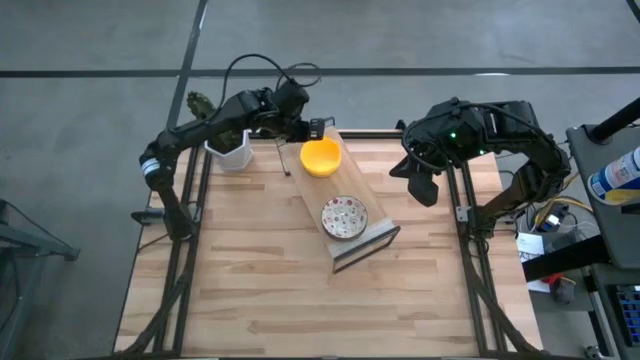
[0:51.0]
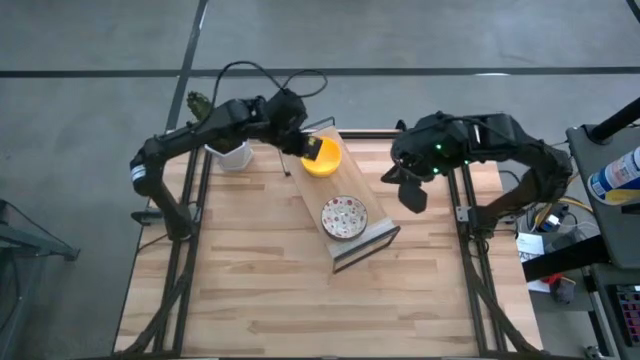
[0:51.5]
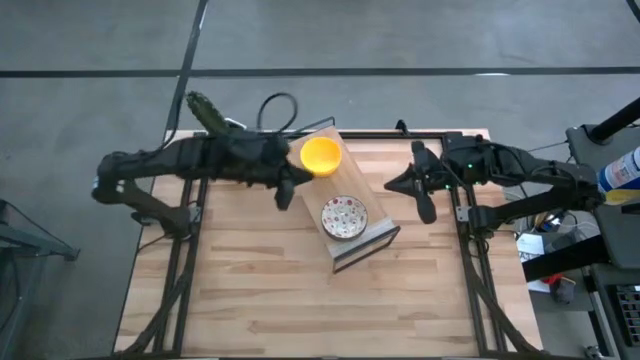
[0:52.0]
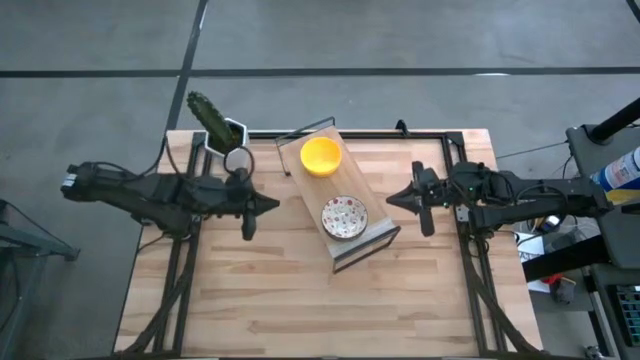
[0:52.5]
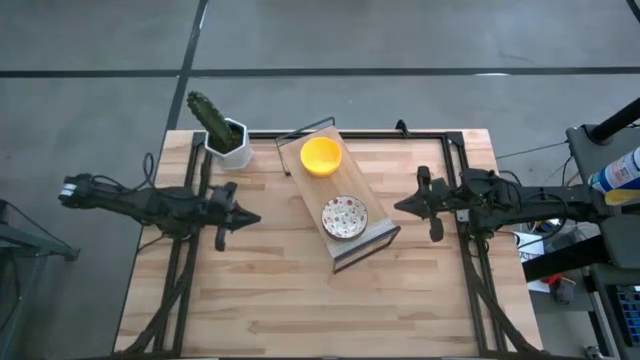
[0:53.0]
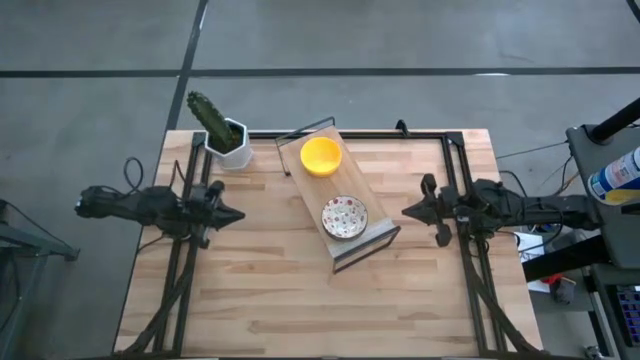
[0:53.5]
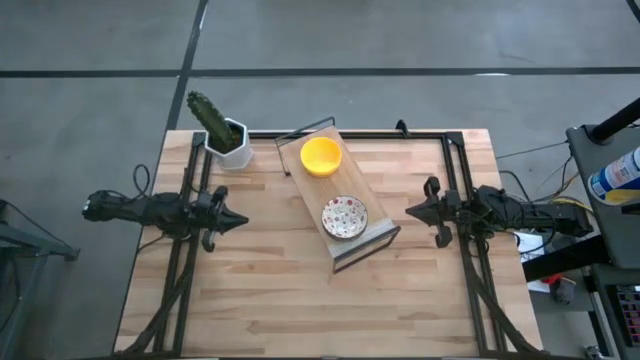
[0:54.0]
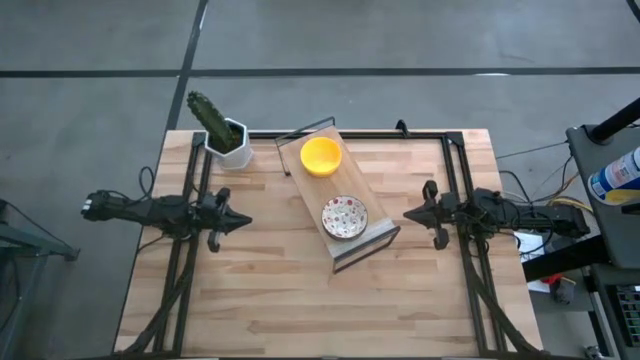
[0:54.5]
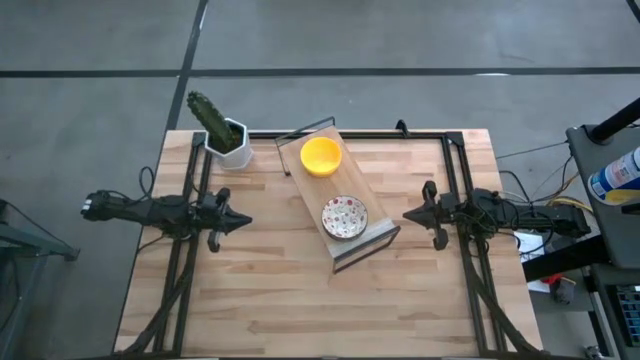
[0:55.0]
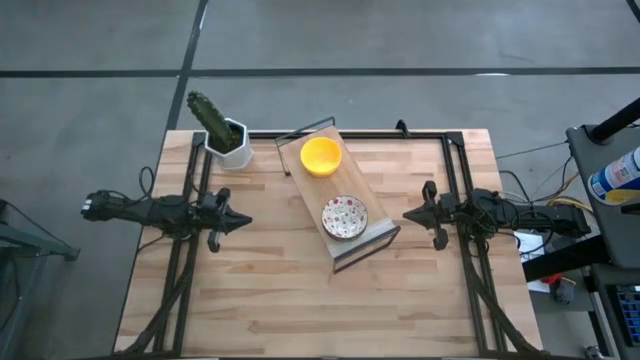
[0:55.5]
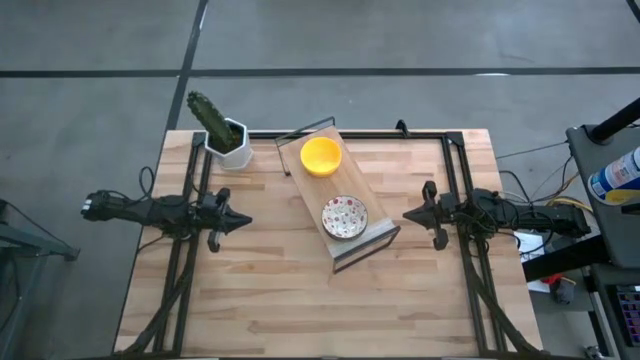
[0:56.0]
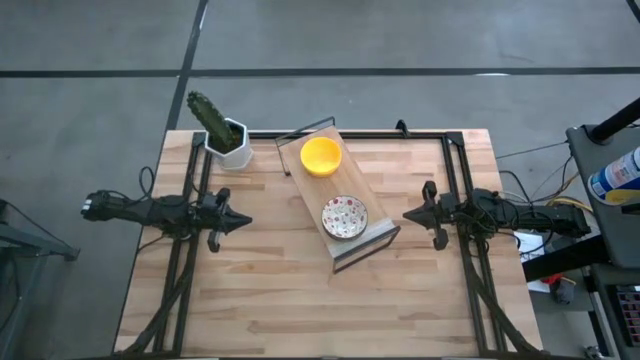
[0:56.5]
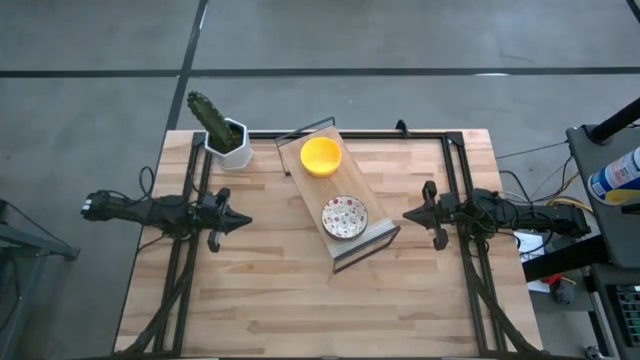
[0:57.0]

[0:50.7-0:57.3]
Task: Pick & Place Mini bowls
Return to Home Position

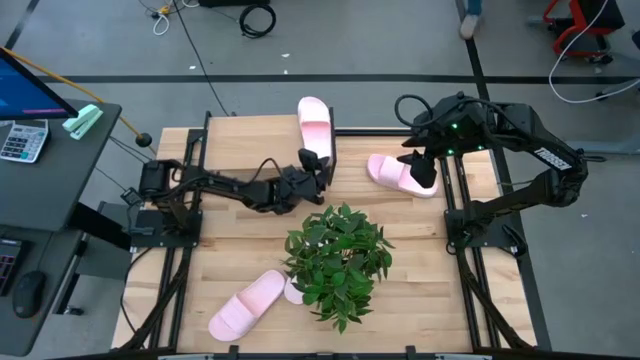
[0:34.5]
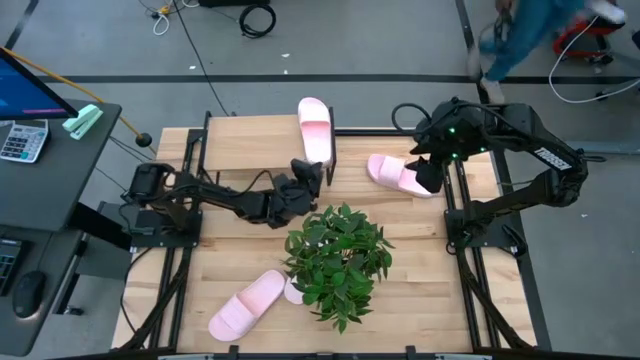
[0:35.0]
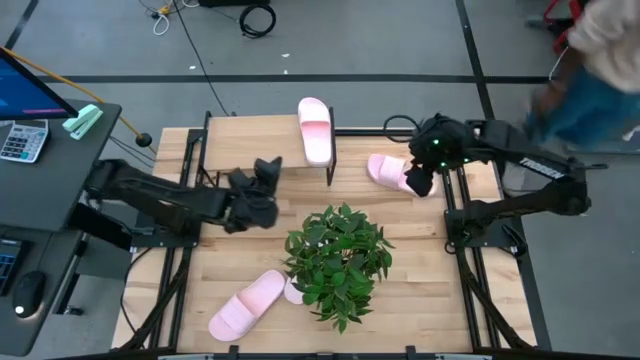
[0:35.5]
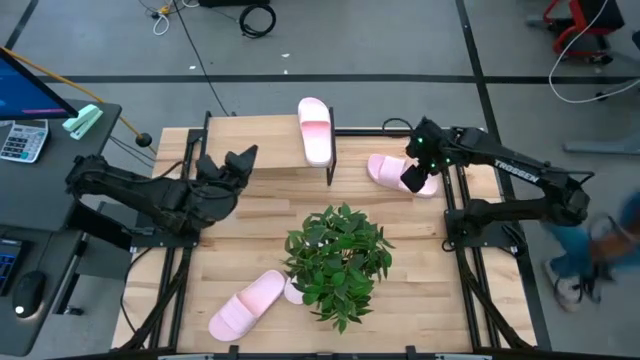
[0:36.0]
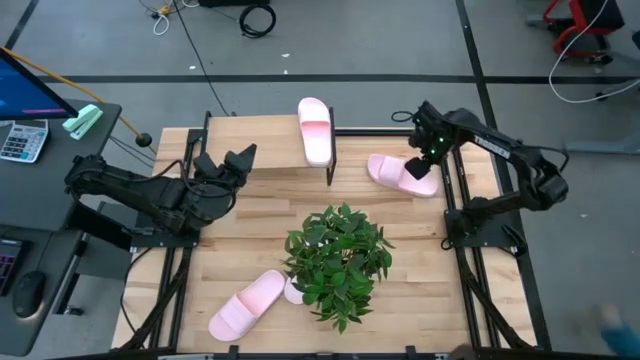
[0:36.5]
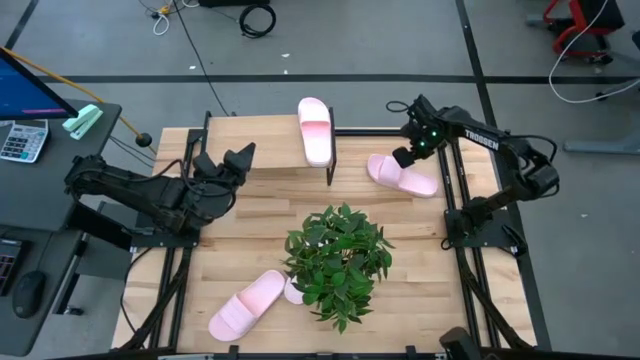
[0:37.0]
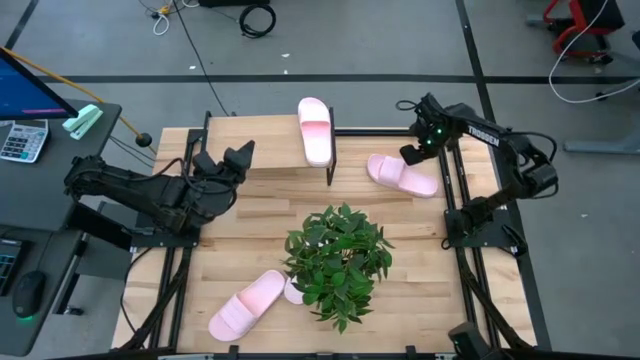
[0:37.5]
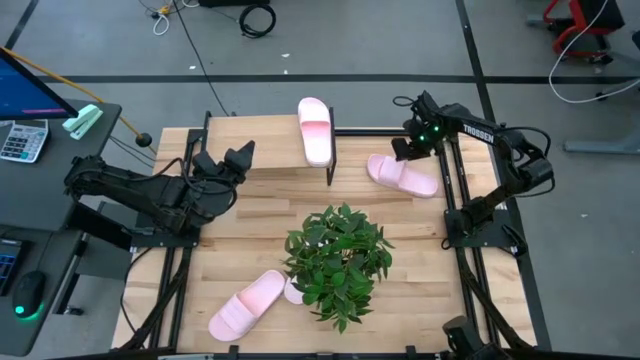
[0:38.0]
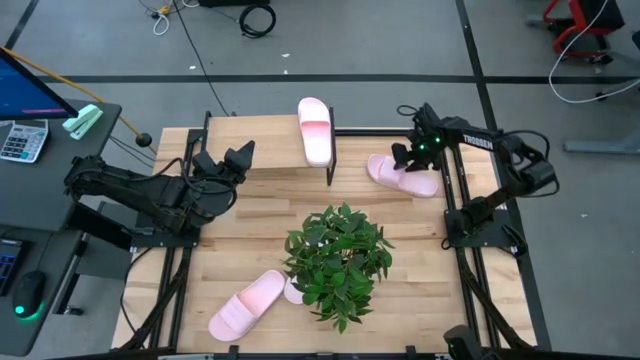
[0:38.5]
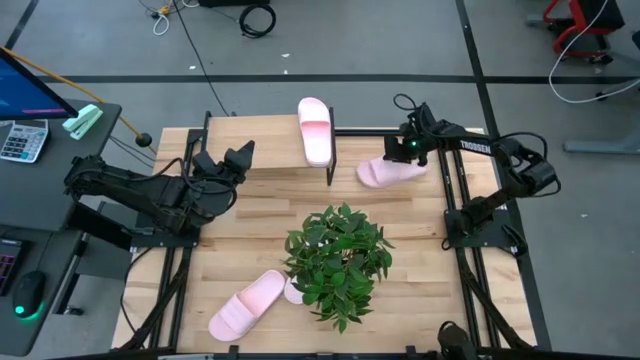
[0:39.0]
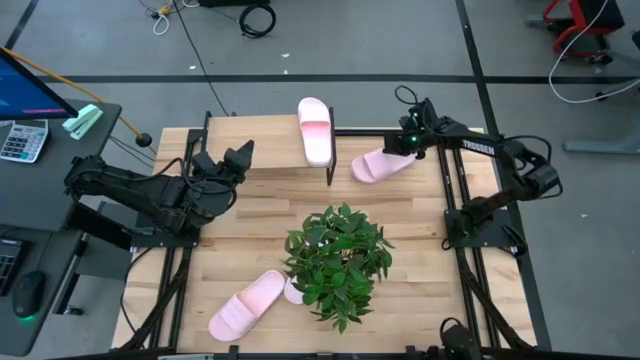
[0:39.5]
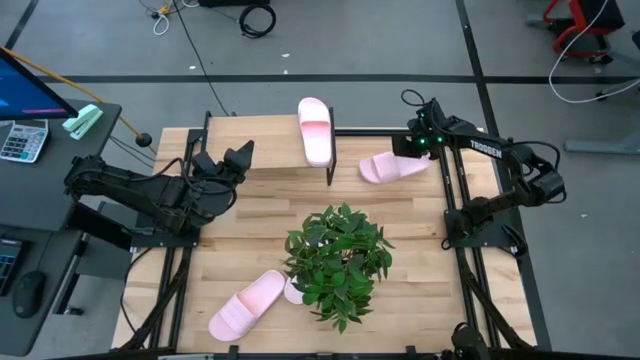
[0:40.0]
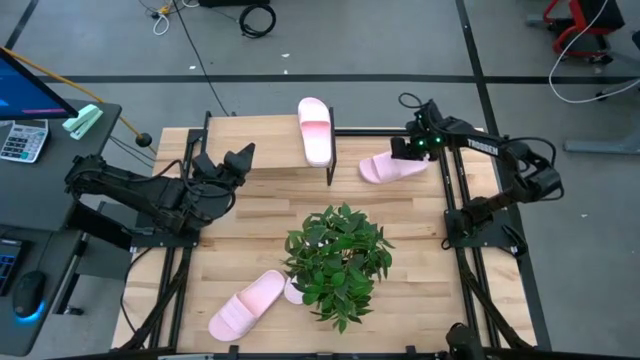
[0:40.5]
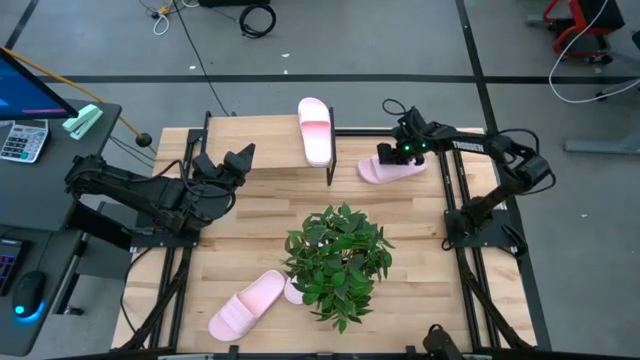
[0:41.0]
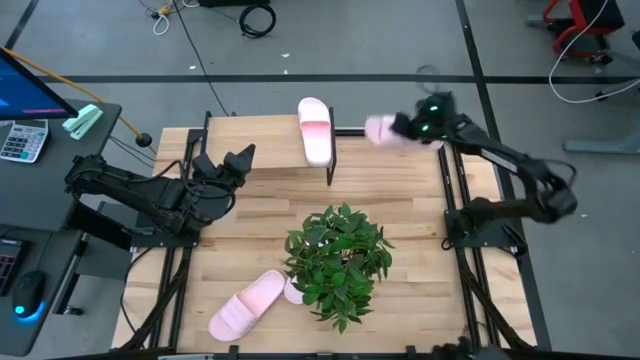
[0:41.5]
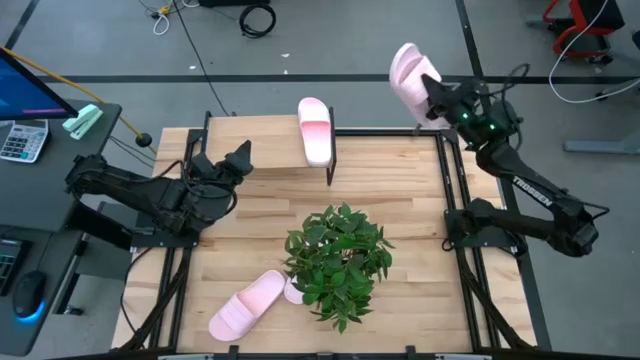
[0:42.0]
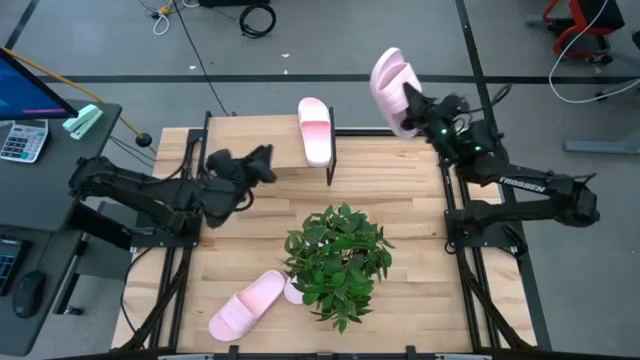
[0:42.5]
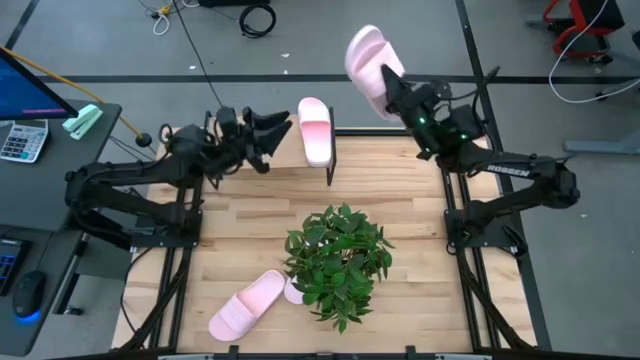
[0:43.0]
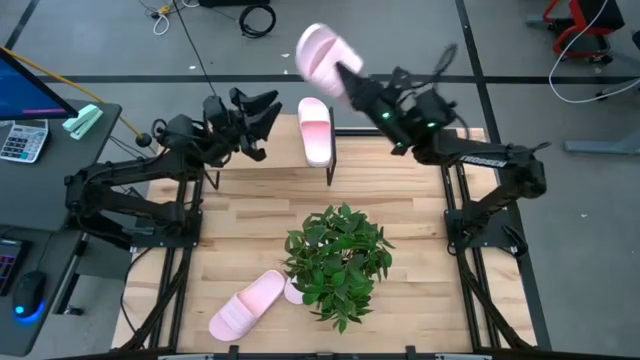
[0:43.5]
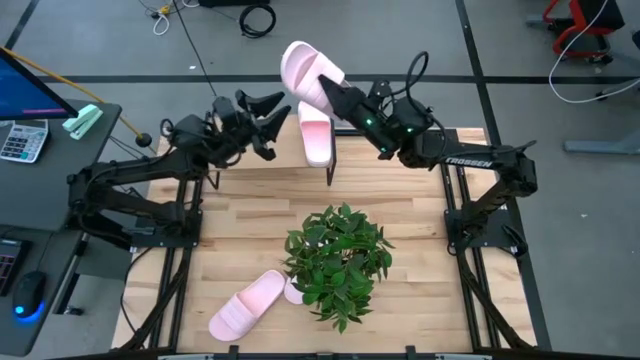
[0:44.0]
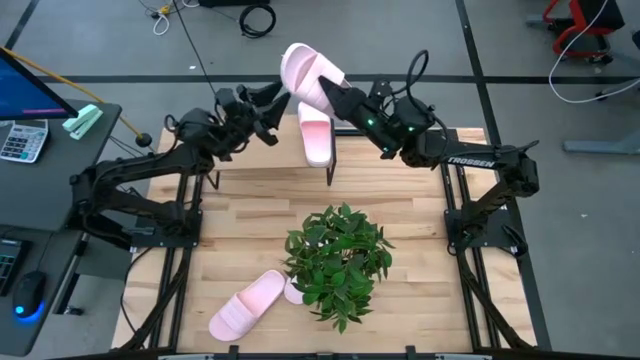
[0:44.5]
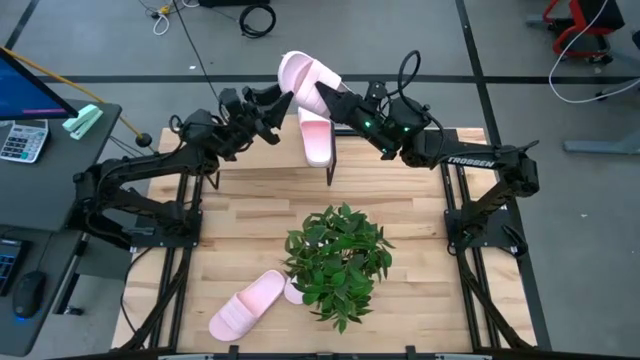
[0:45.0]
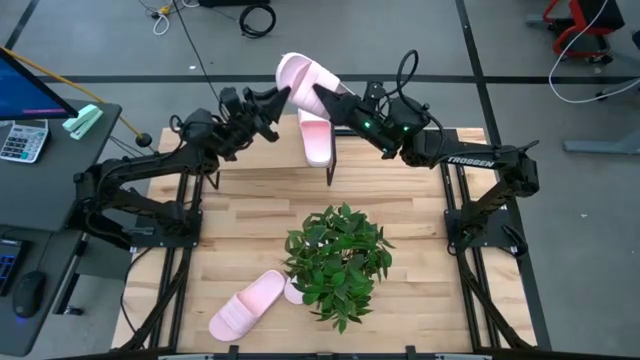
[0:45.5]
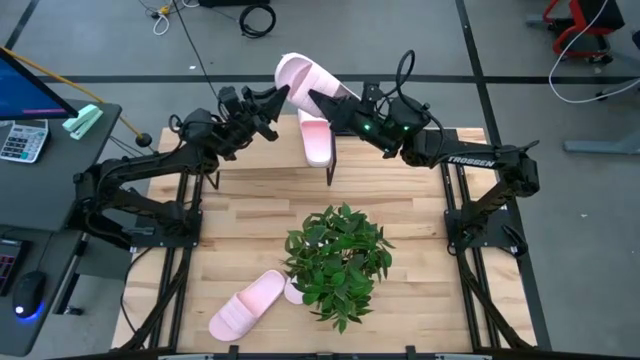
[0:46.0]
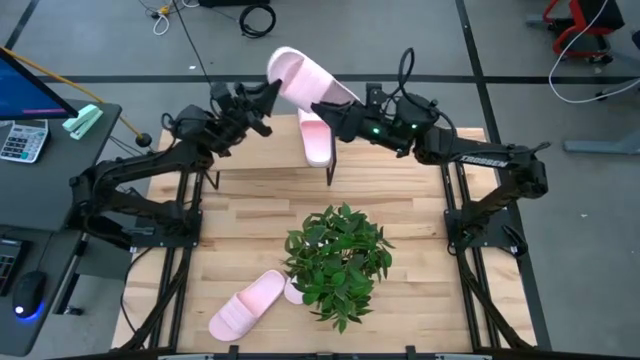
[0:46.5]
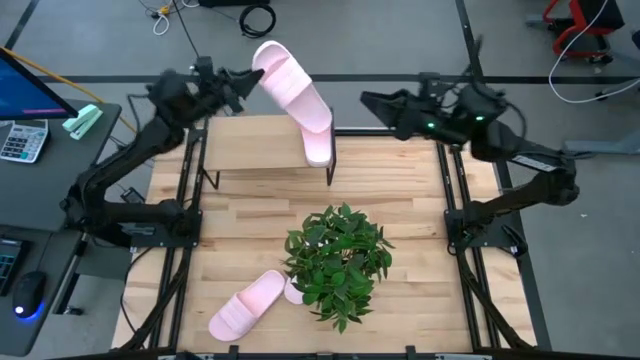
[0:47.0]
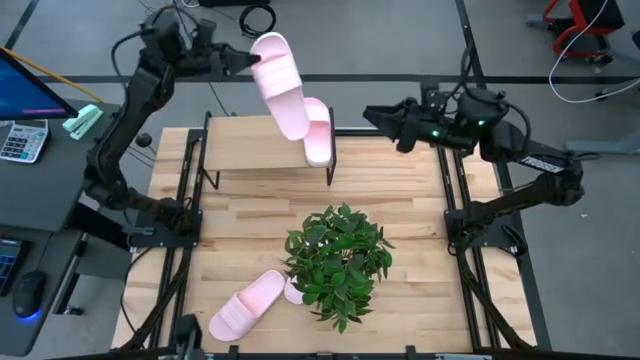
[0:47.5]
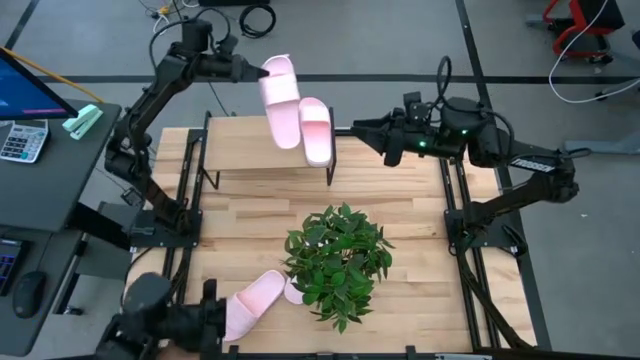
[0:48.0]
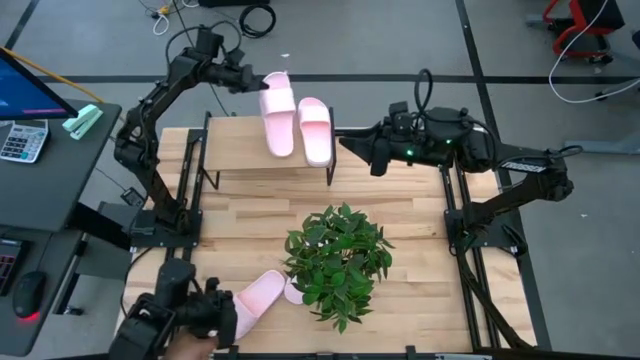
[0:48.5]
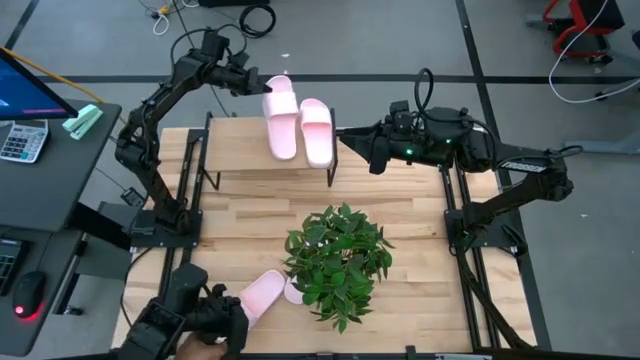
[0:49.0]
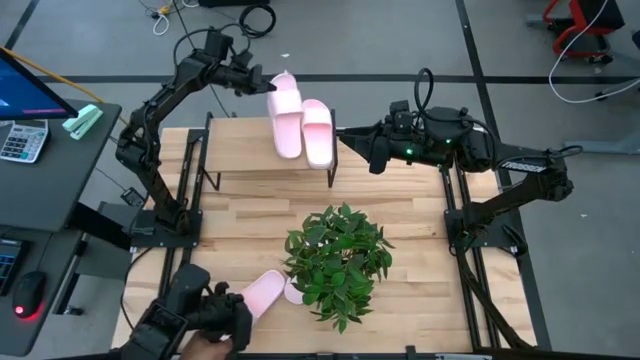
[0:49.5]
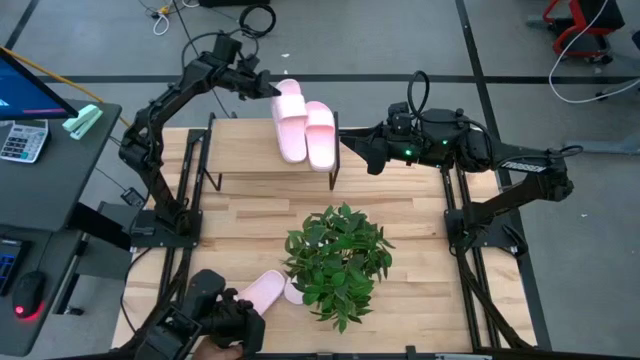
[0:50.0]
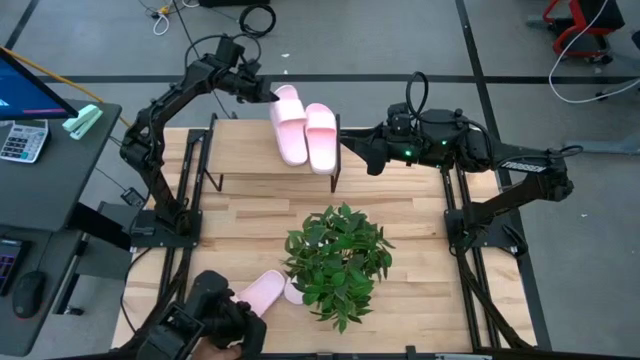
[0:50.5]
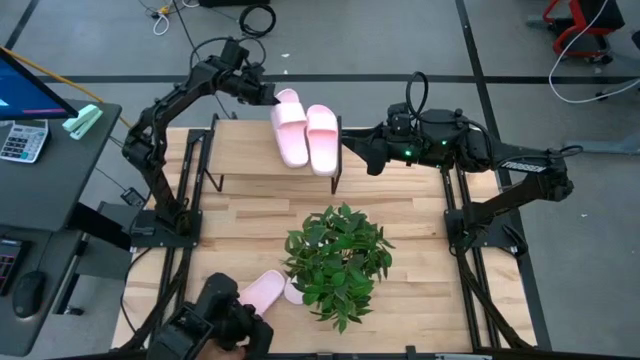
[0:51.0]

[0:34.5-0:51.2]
Task: Pick and place slides into the shelf
Put the pink slide on the shelf
